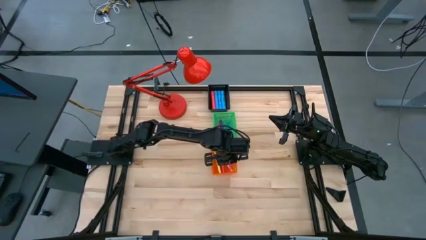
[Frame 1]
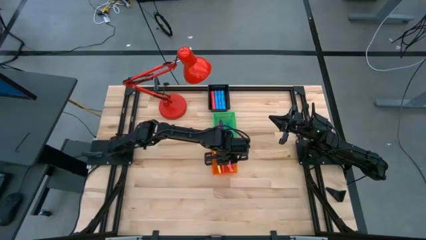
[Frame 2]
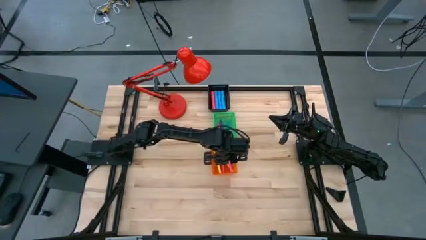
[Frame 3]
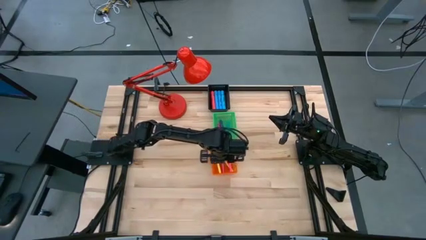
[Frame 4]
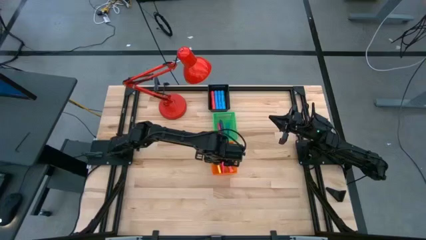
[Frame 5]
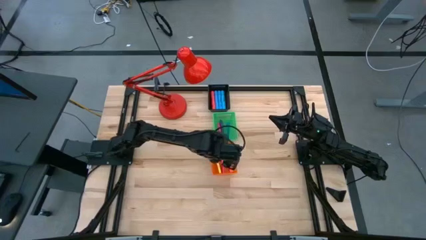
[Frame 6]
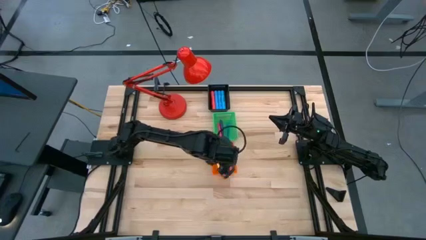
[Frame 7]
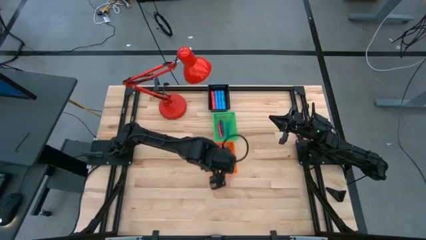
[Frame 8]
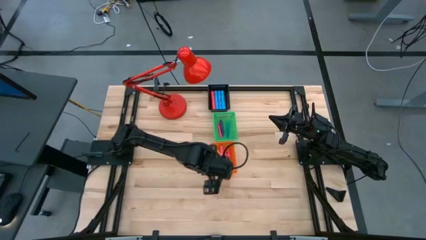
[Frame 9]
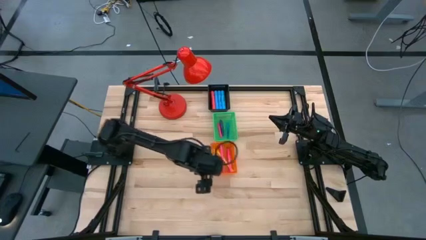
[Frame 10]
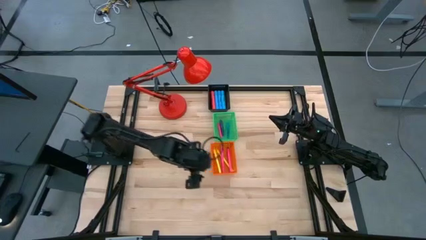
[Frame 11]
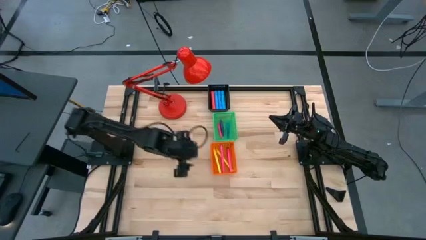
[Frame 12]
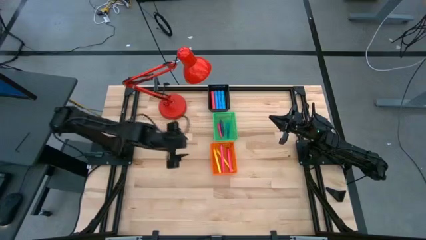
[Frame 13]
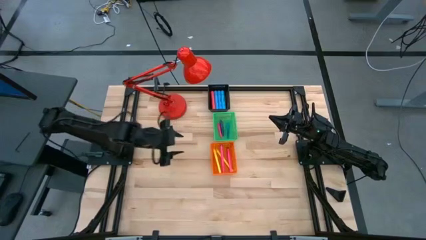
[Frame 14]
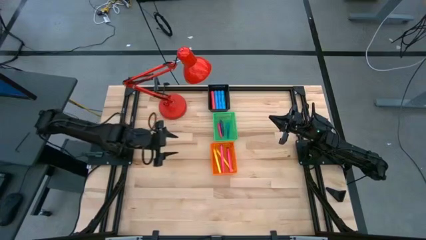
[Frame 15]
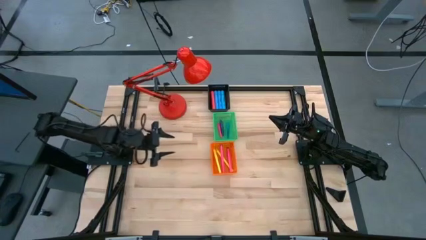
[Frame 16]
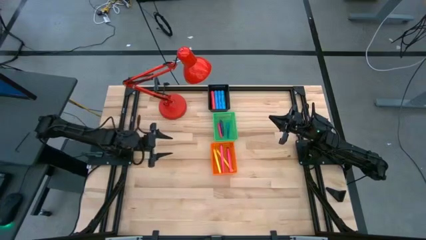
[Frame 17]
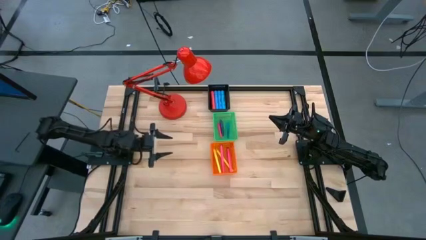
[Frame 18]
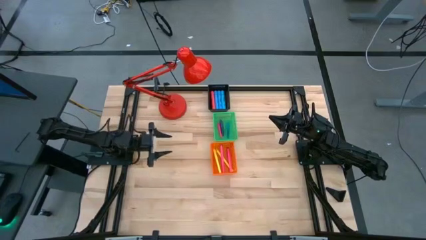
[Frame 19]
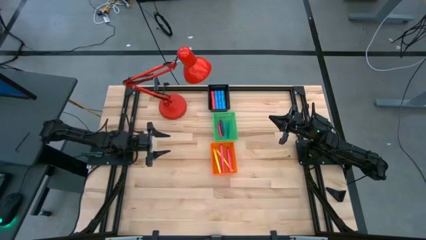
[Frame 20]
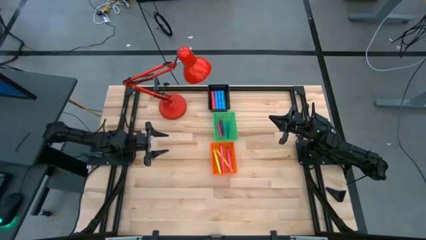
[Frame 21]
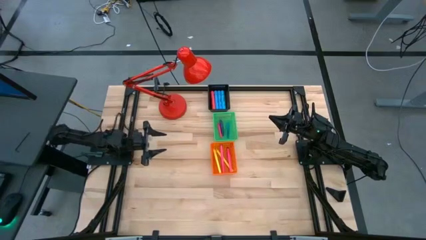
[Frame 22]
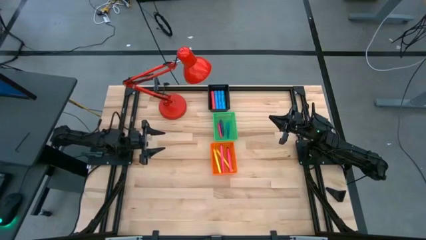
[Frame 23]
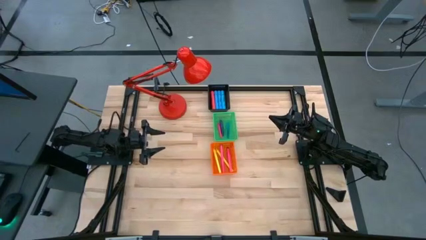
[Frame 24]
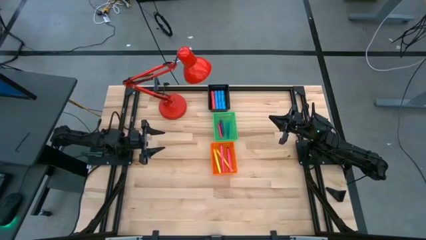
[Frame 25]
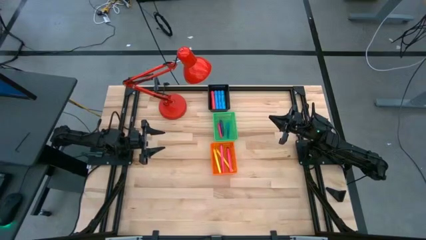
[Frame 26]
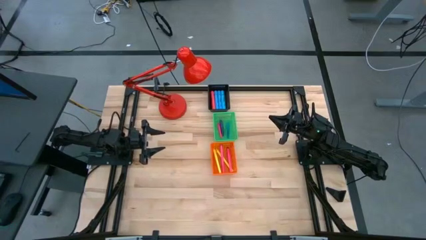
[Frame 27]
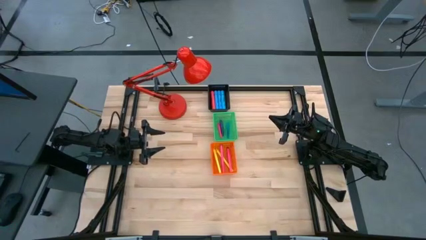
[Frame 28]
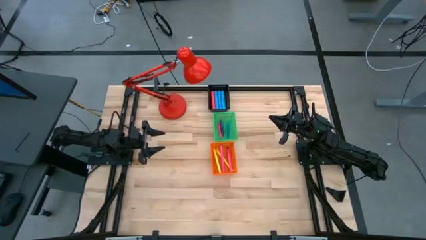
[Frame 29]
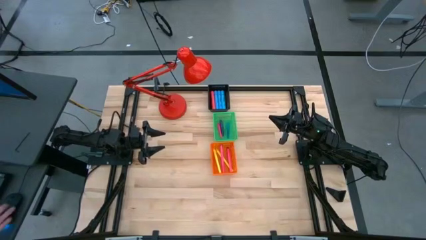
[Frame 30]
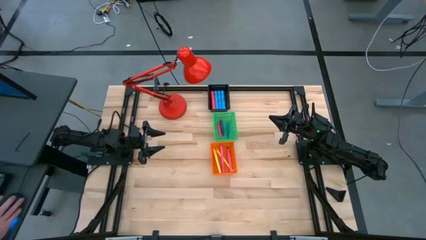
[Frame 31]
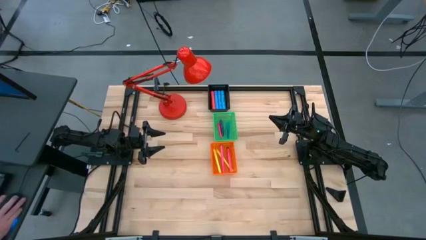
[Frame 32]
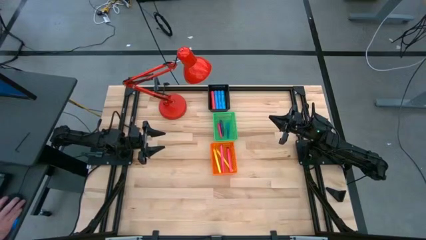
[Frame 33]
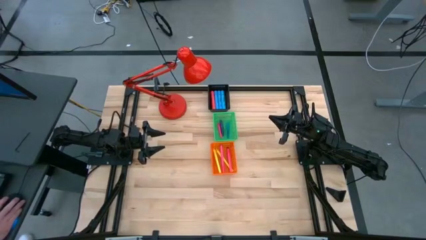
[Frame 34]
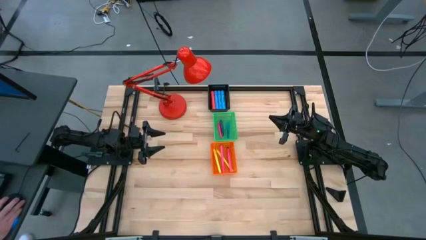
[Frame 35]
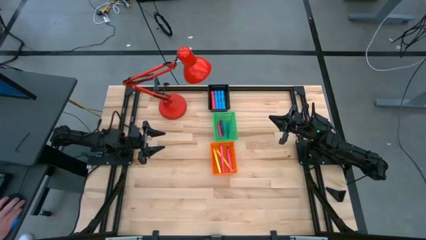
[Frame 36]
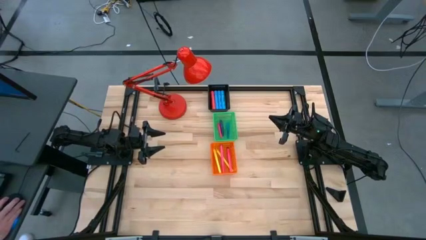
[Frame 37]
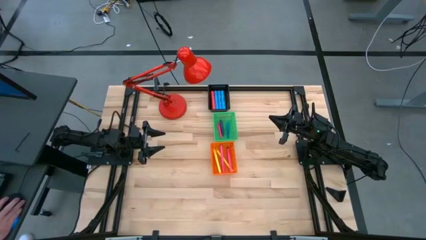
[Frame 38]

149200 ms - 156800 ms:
Task: Pick & Place Markers
Return to Home Position

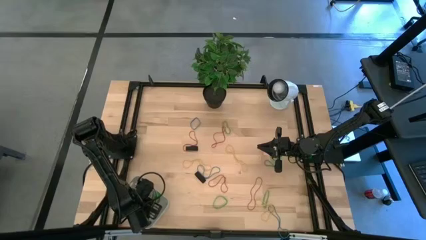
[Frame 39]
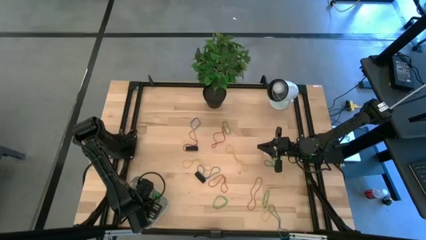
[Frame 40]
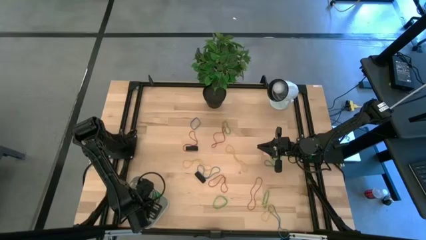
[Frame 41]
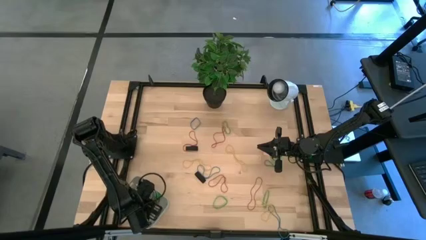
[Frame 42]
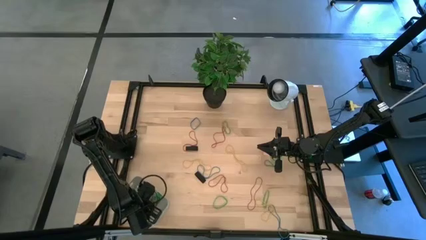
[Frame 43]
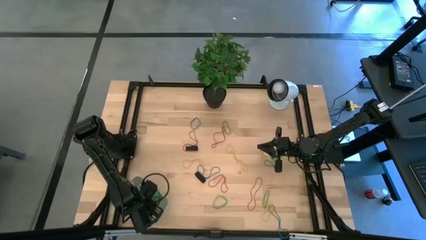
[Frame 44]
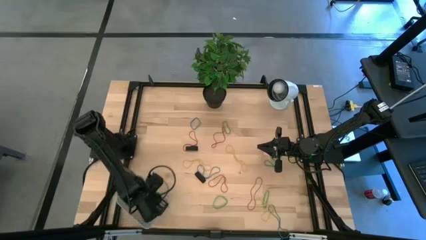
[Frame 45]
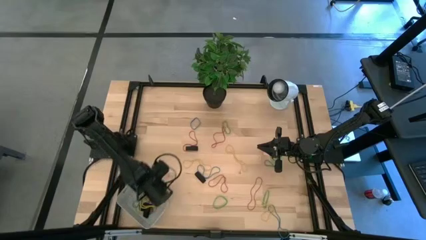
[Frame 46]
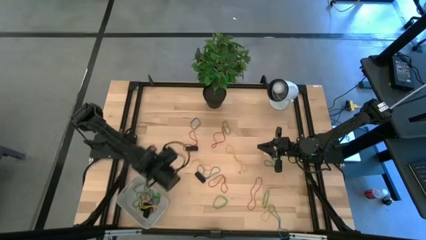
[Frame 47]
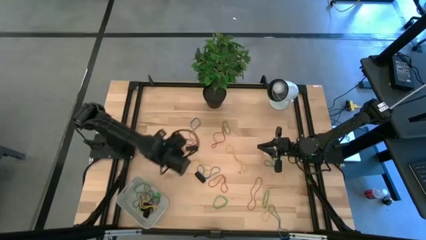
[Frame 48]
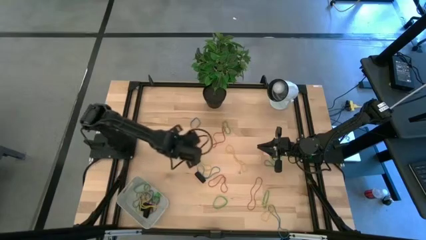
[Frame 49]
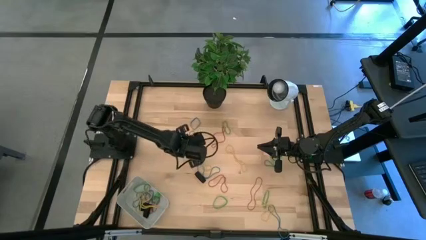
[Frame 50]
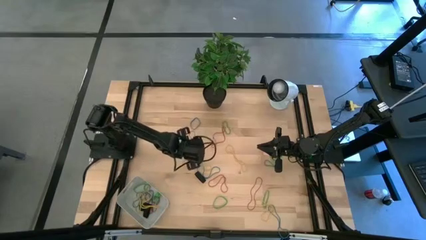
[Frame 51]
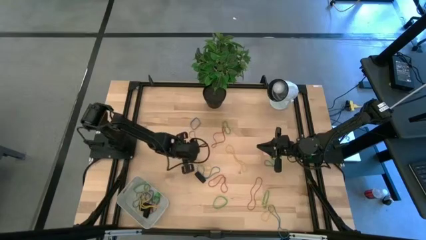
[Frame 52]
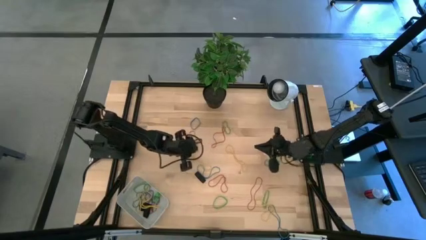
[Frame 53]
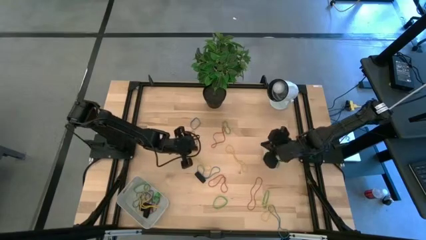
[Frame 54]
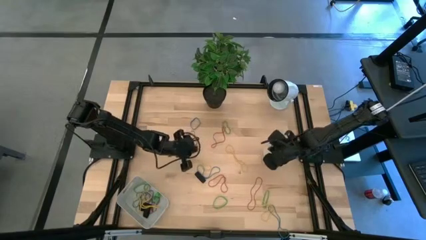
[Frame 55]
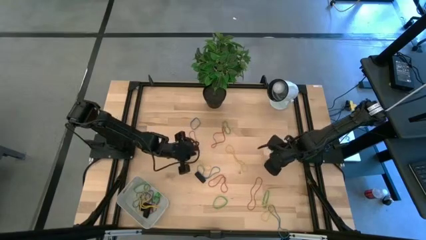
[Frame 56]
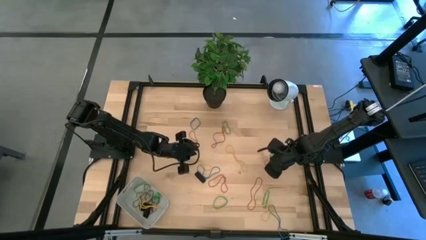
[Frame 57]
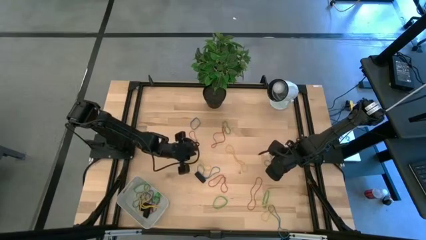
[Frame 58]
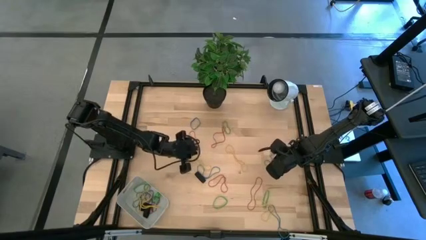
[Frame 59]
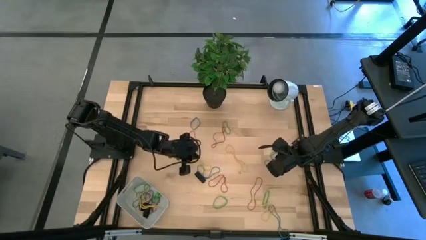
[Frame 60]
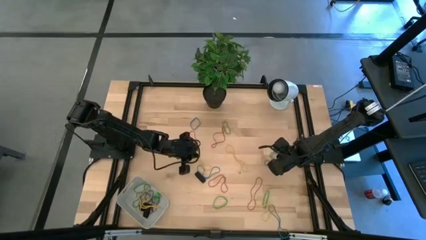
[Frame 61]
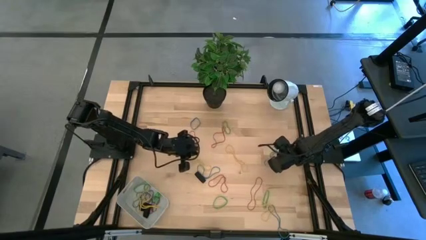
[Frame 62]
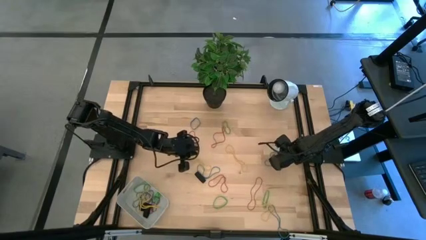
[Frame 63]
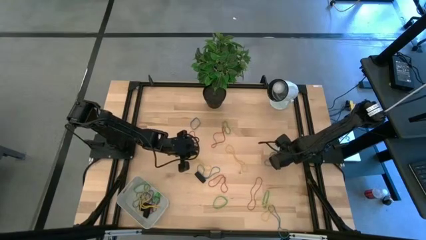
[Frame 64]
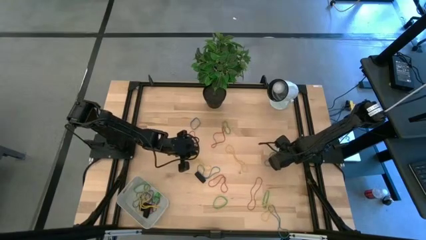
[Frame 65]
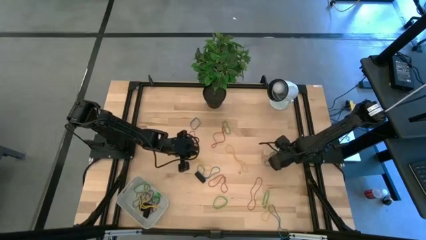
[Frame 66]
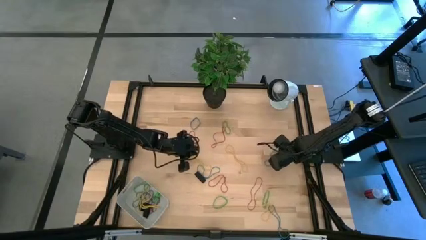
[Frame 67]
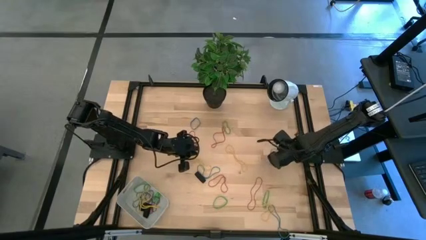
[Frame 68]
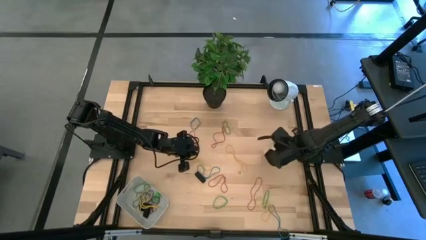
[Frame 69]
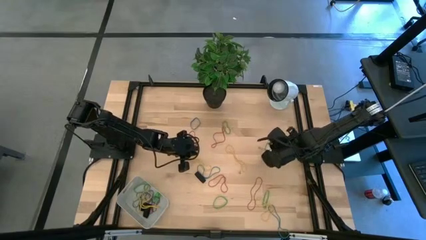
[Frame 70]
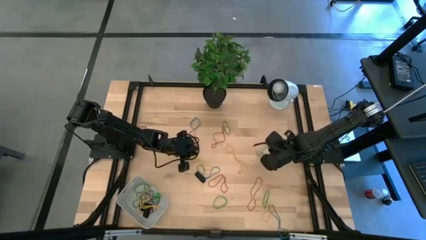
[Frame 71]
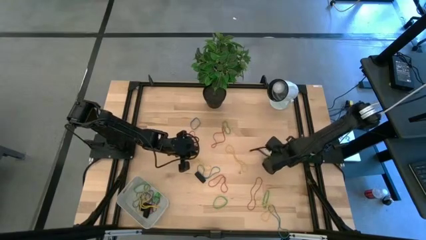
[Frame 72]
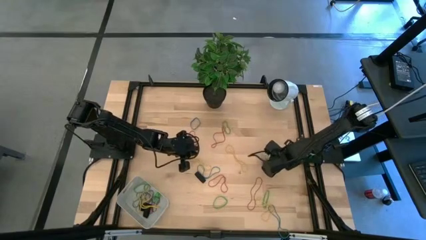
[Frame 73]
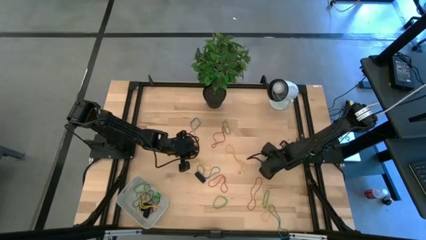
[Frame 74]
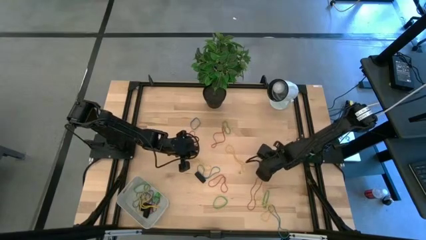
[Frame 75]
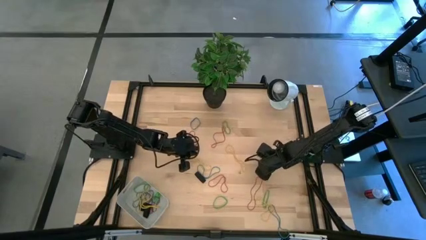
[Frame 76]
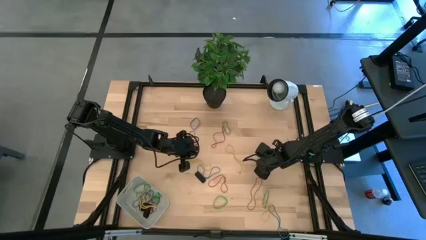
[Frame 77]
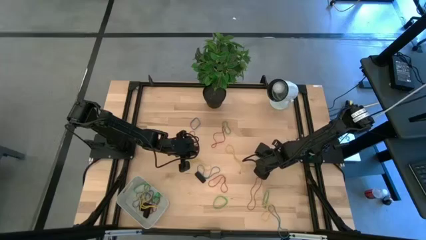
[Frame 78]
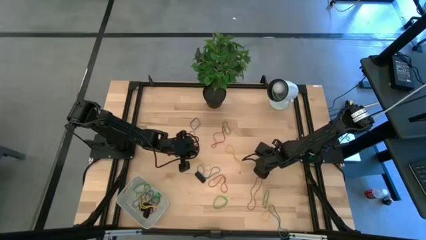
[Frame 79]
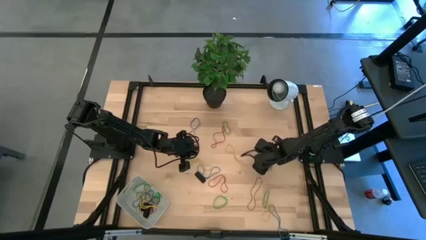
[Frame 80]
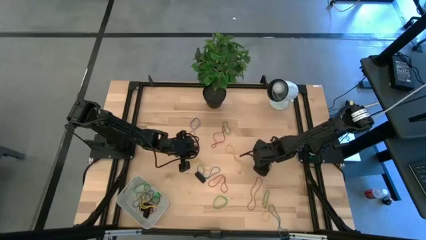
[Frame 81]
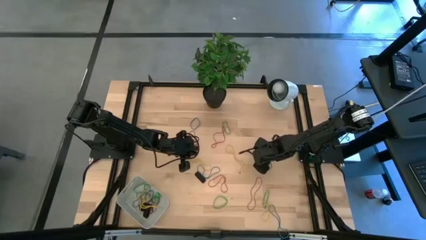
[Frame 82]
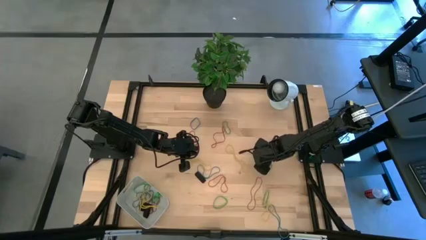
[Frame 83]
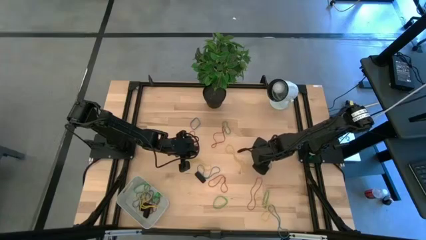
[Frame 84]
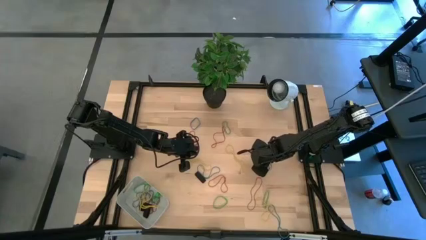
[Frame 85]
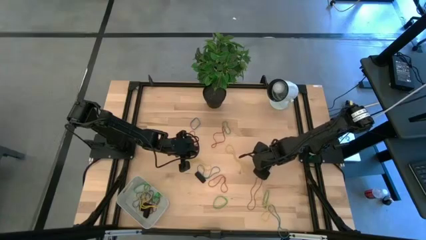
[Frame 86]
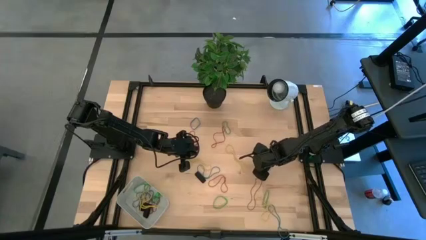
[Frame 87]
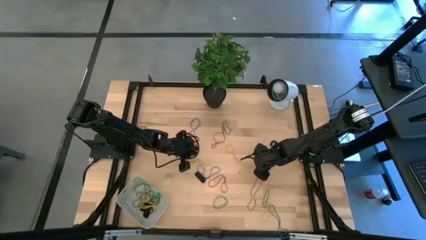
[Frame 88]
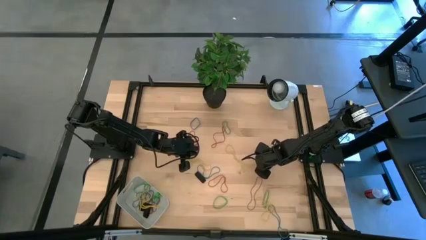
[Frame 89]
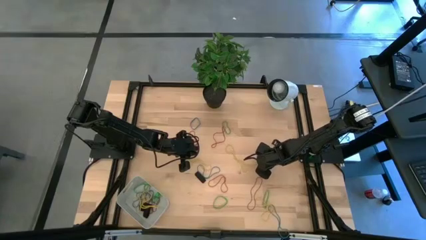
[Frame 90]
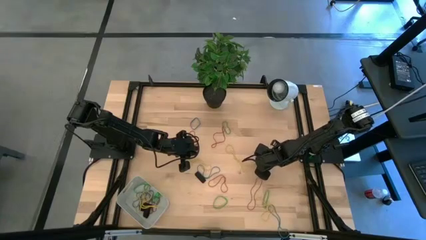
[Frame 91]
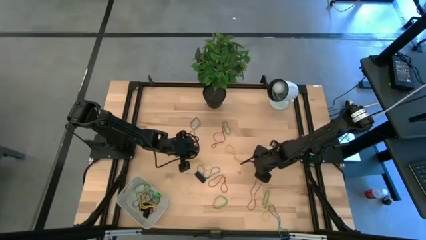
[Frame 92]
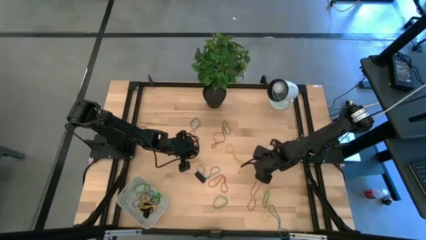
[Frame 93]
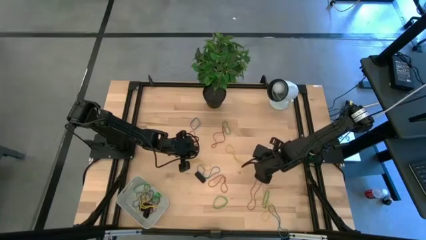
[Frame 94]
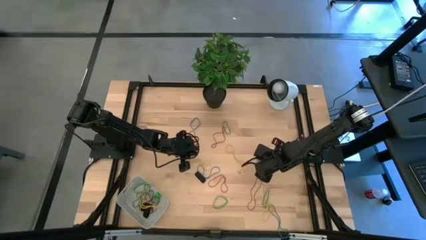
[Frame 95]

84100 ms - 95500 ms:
Task: Pick and place rubber bands into bin
Put the green rubber band into the gray bin
